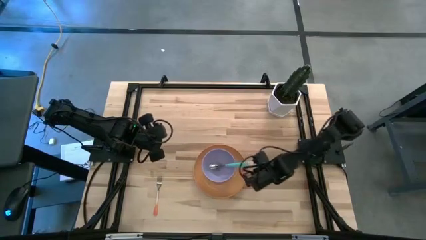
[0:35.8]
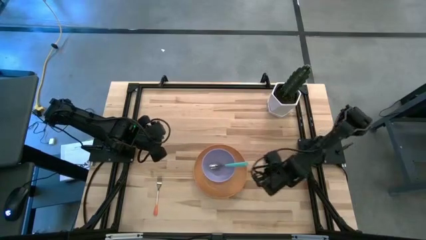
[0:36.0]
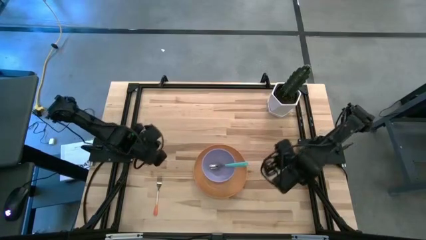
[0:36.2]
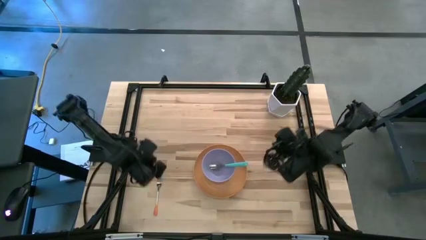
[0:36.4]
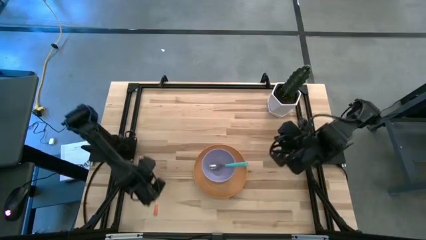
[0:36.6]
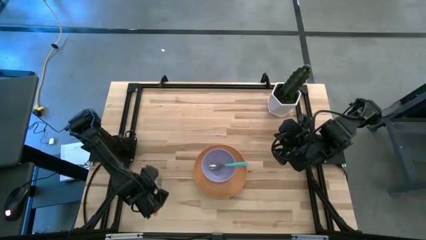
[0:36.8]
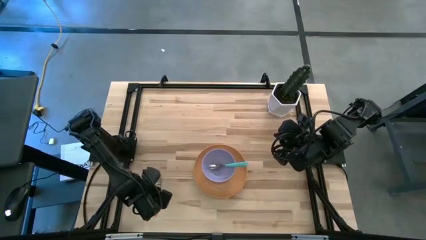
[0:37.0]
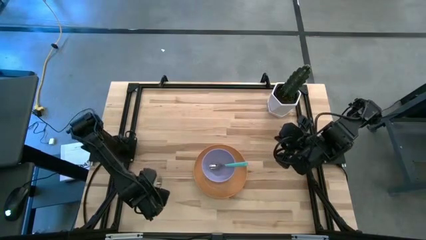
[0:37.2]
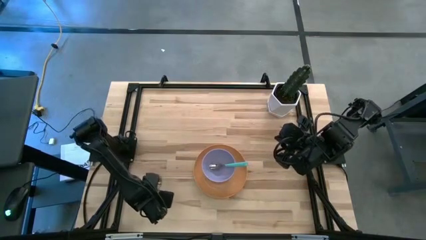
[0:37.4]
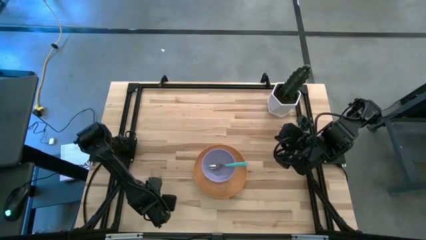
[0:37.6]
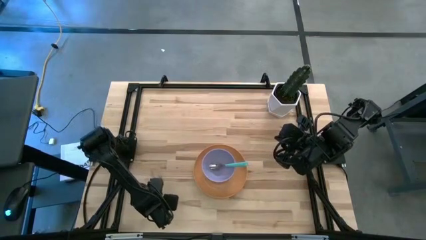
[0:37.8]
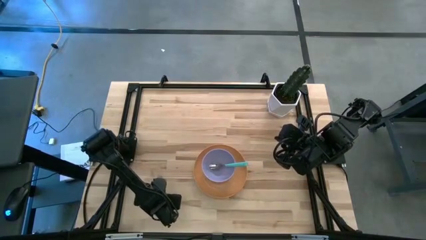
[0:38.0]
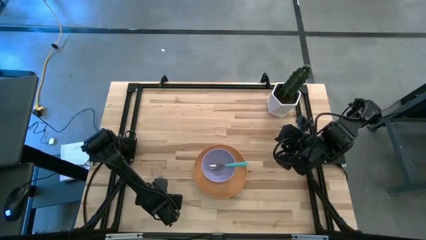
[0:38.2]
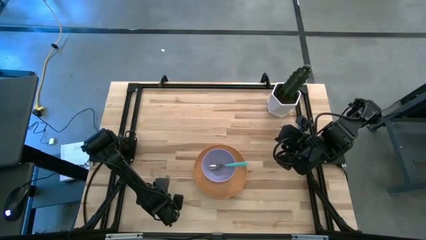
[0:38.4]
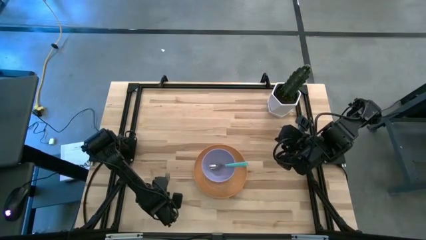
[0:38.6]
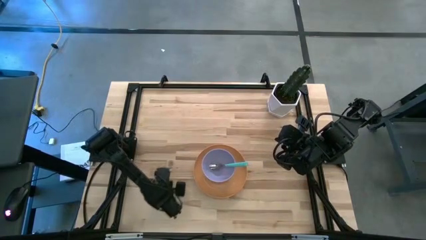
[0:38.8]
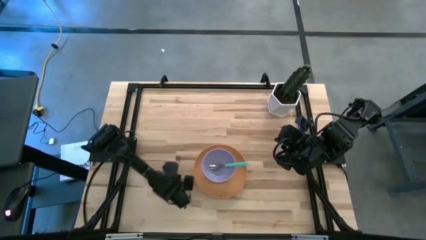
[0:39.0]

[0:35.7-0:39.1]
Task: Set table place
Move the orange fork to the left of the orange plate

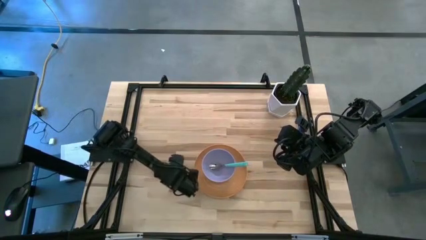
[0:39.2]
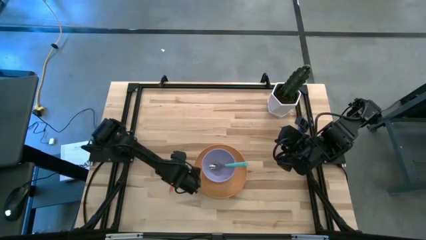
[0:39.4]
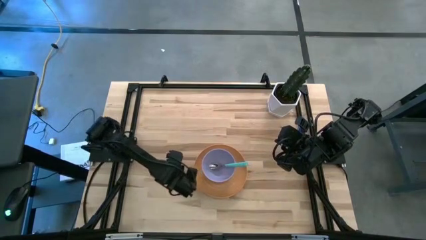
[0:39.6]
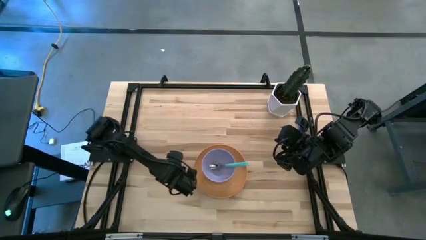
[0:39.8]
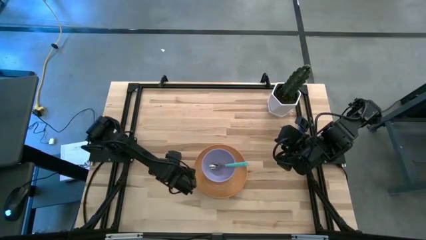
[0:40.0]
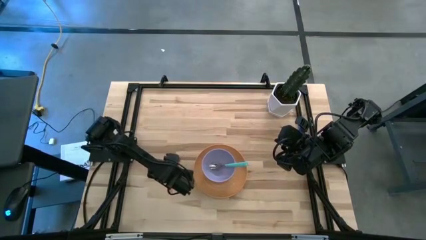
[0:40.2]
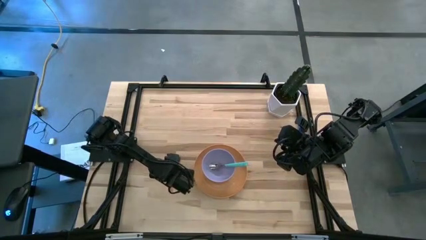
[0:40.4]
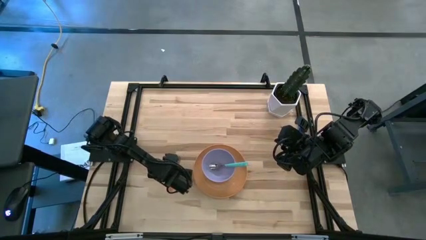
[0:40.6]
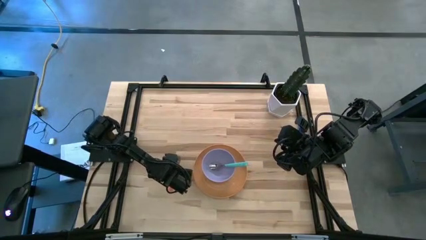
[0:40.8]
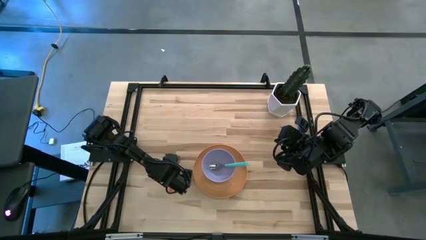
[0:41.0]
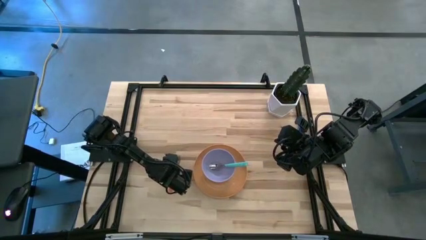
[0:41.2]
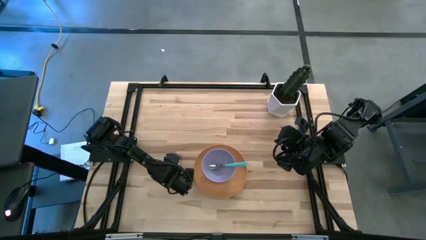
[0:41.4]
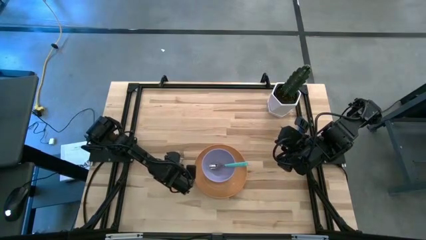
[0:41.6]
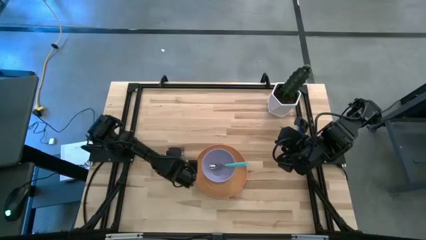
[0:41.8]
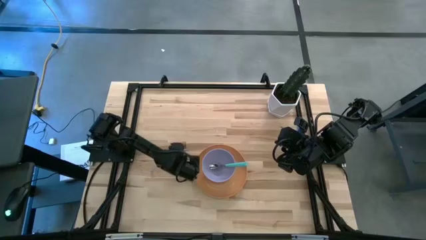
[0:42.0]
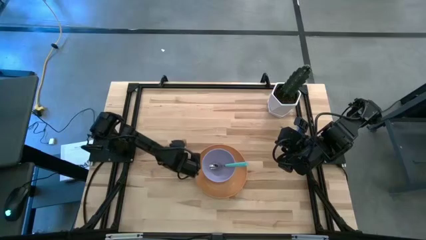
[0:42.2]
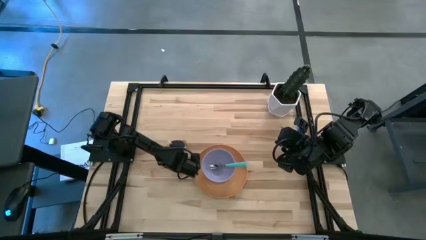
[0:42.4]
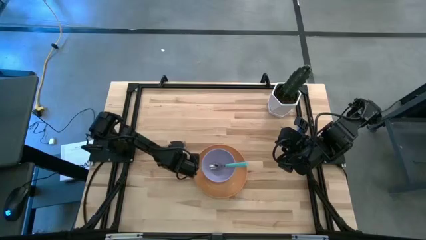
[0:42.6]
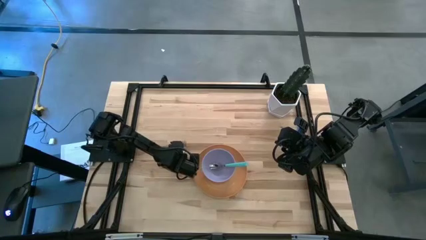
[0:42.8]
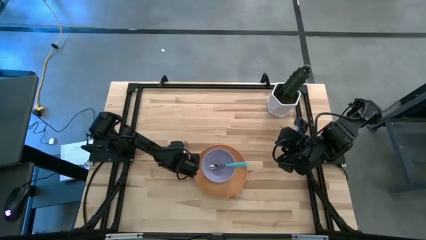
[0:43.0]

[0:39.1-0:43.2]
Move the orange fork to the left of the orange plate

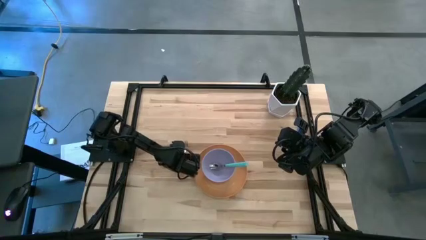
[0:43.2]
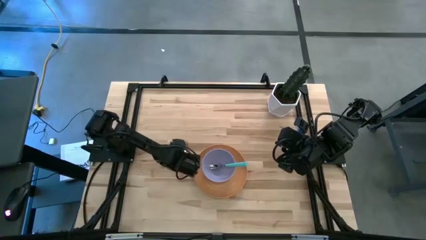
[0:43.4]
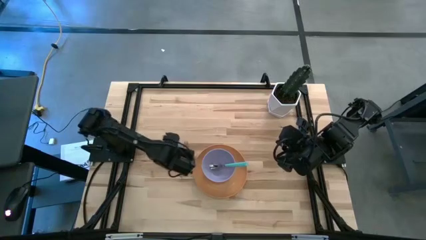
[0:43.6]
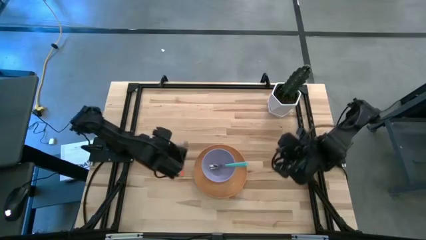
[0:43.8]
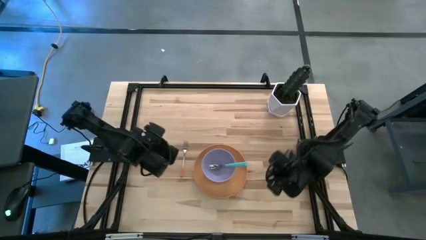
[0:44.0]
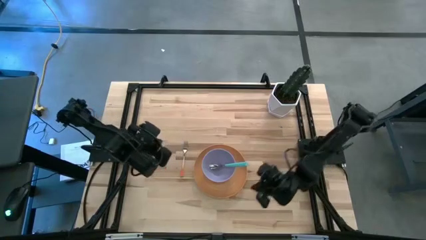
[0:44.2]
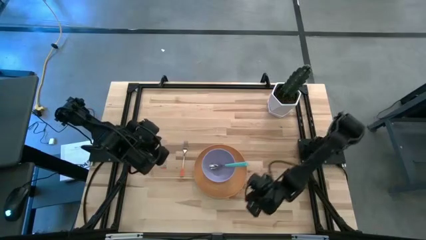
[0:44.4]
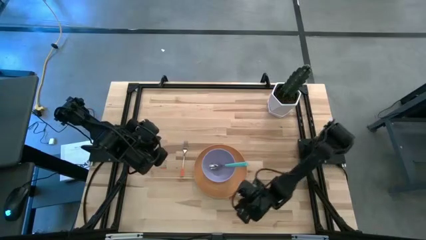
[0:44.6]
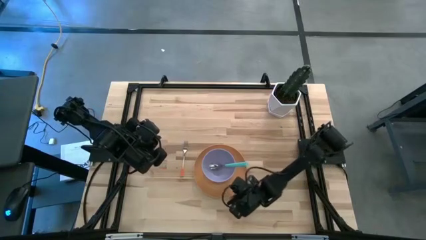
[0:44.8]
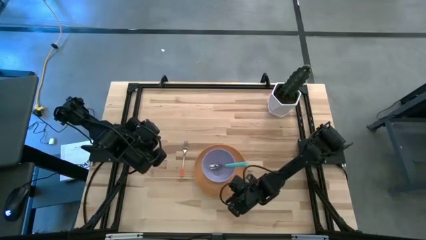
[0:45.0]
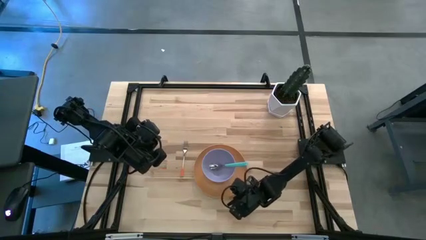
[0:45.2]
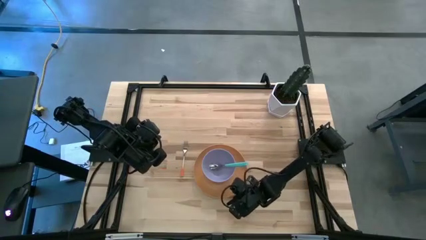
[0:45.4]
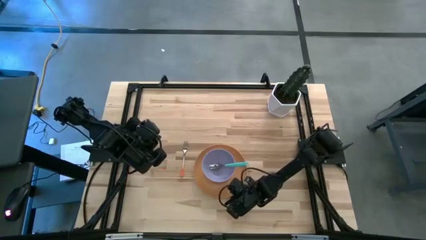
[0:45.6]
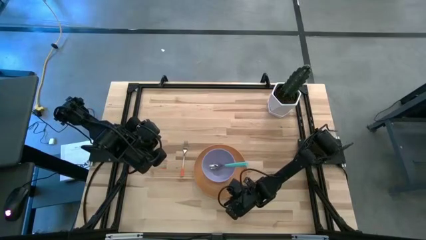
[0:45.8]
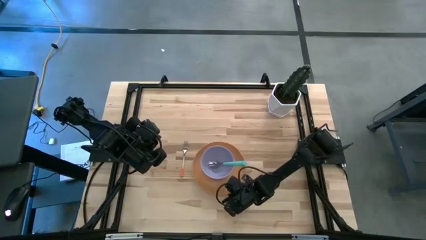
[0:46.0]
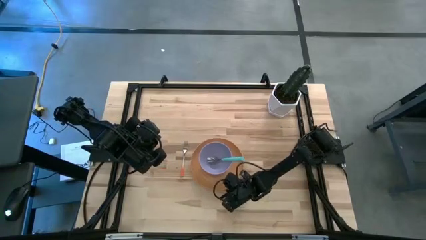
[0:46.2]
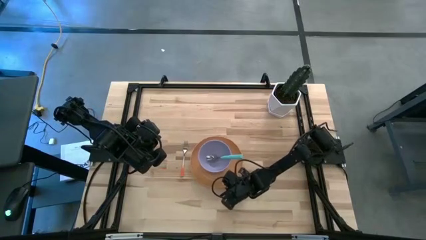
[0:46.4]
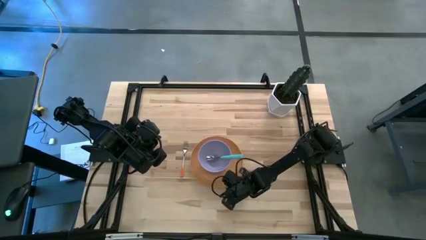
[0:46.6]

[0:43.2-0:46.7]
Adjust the orange plate
